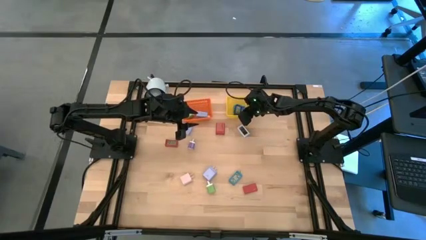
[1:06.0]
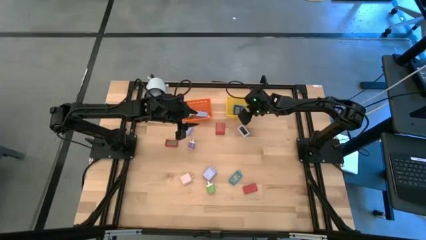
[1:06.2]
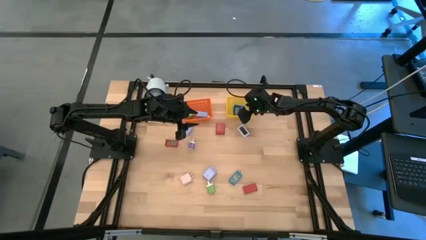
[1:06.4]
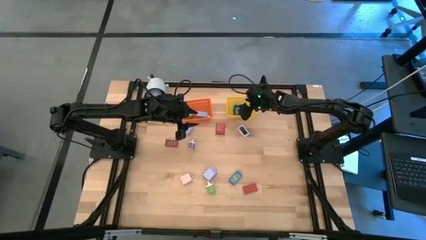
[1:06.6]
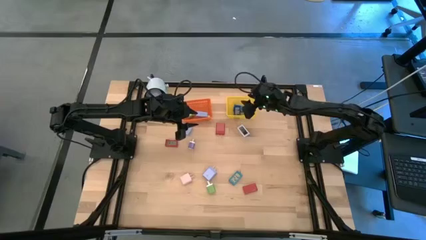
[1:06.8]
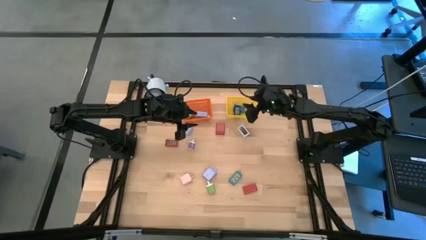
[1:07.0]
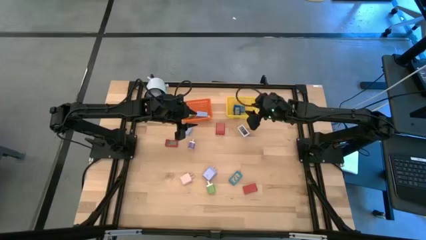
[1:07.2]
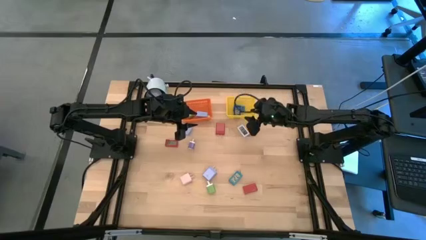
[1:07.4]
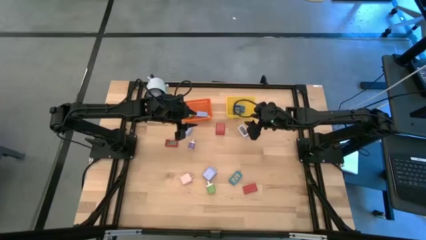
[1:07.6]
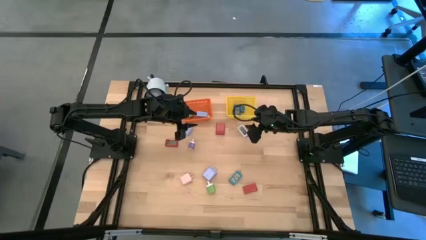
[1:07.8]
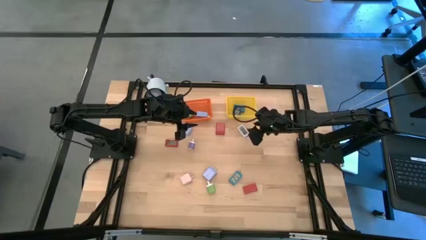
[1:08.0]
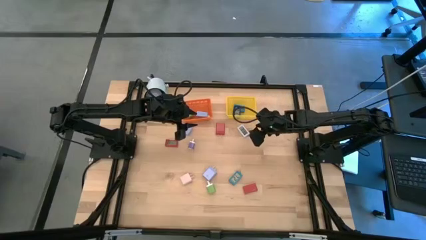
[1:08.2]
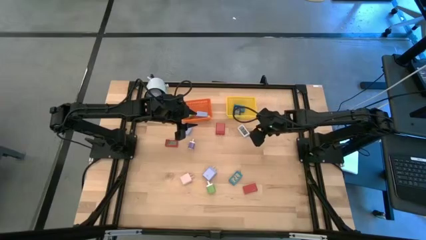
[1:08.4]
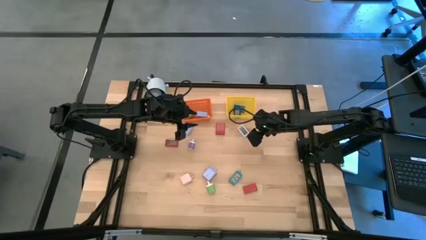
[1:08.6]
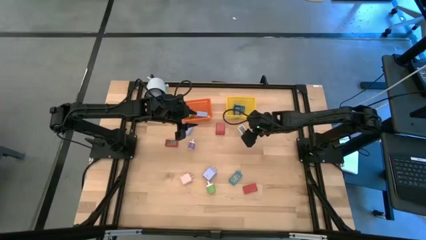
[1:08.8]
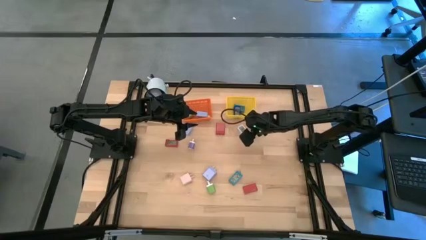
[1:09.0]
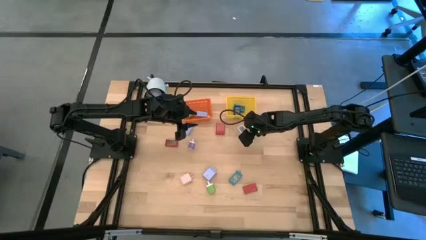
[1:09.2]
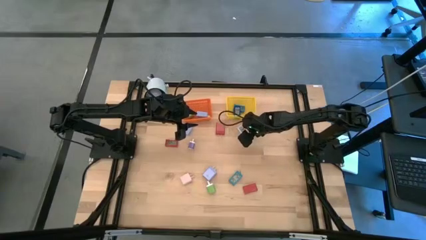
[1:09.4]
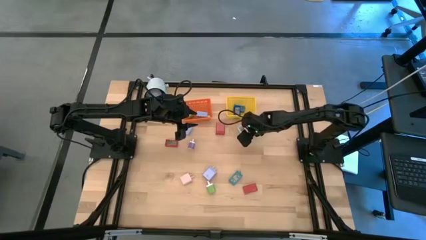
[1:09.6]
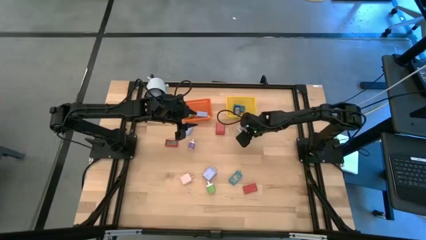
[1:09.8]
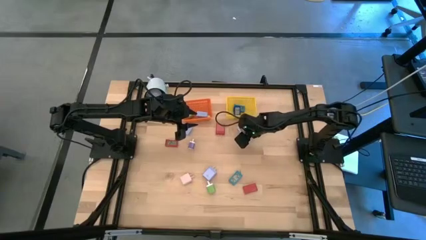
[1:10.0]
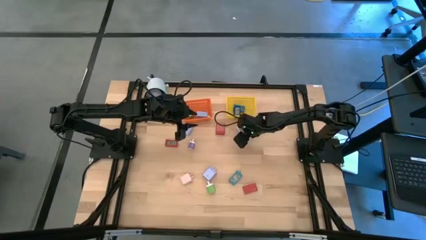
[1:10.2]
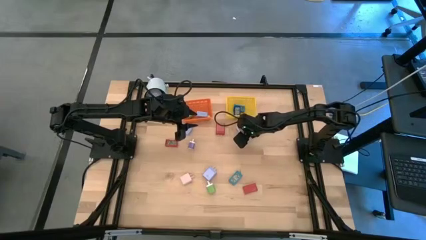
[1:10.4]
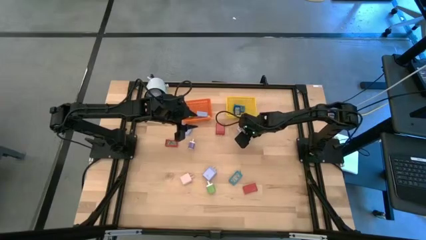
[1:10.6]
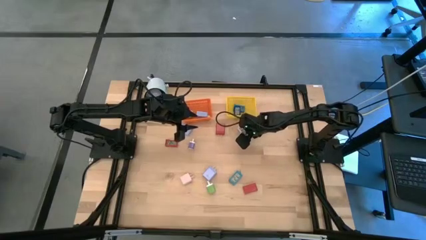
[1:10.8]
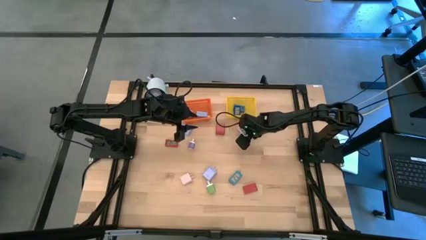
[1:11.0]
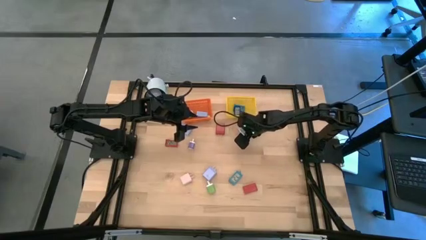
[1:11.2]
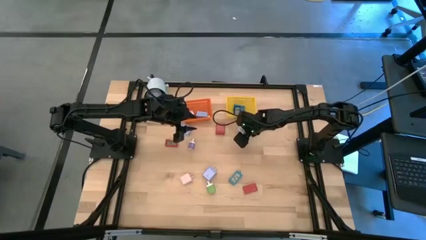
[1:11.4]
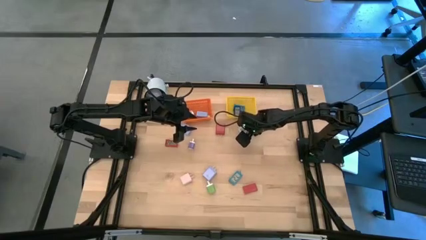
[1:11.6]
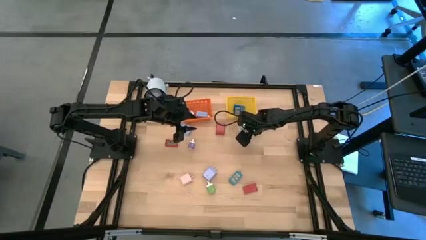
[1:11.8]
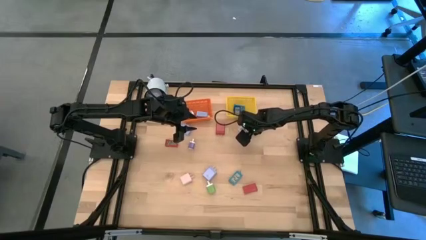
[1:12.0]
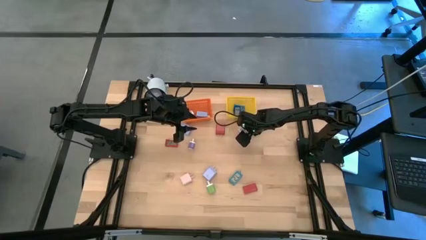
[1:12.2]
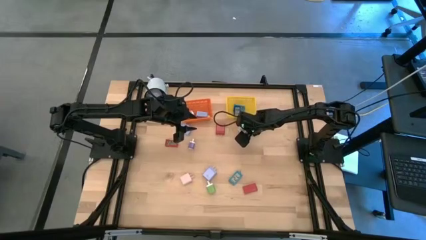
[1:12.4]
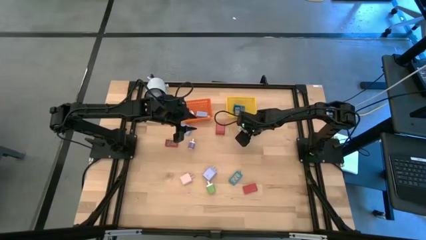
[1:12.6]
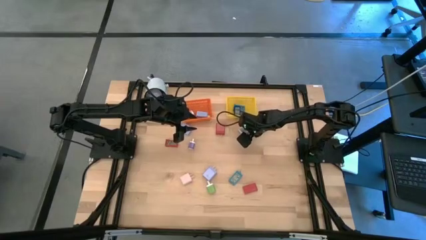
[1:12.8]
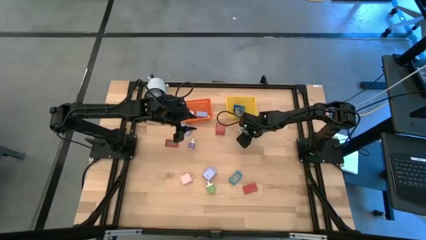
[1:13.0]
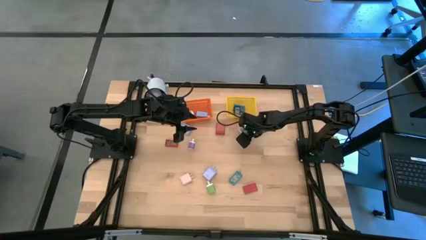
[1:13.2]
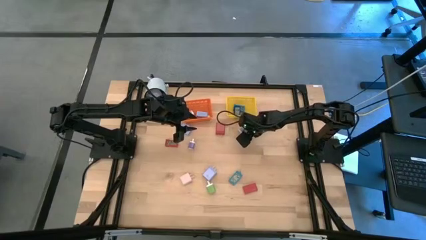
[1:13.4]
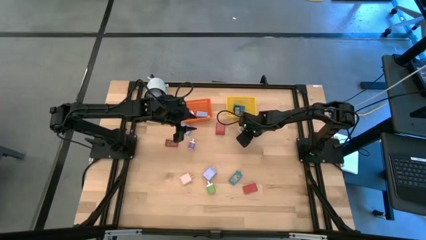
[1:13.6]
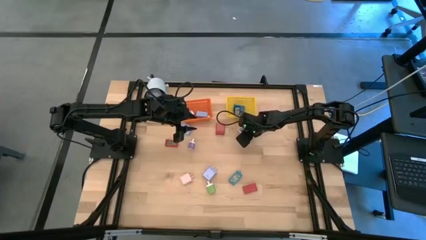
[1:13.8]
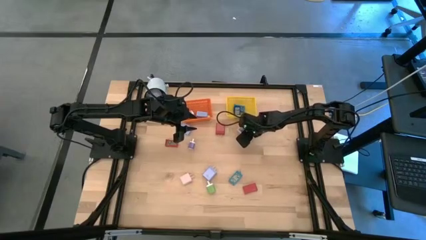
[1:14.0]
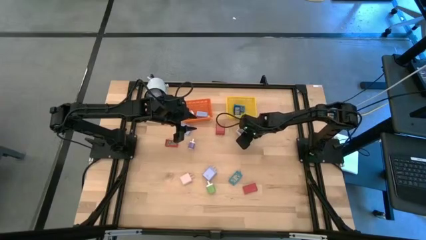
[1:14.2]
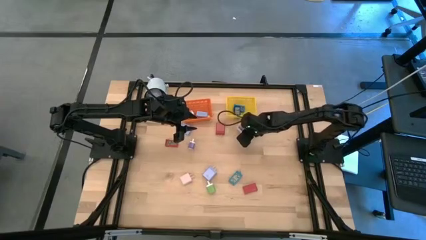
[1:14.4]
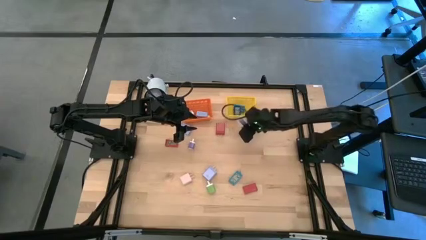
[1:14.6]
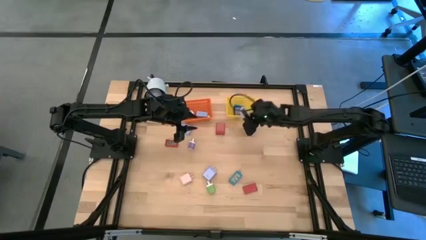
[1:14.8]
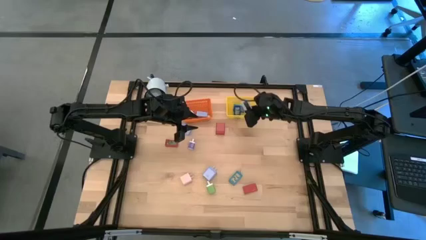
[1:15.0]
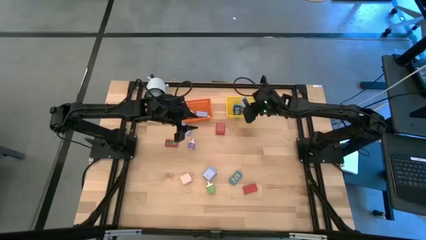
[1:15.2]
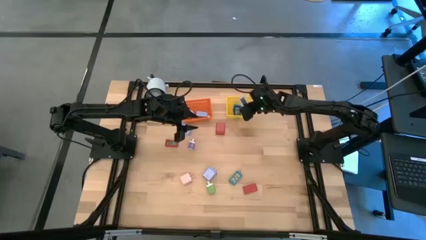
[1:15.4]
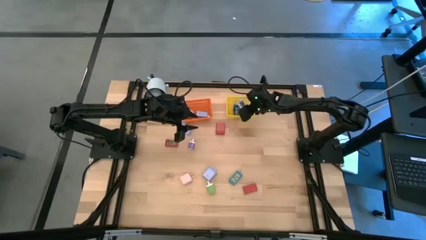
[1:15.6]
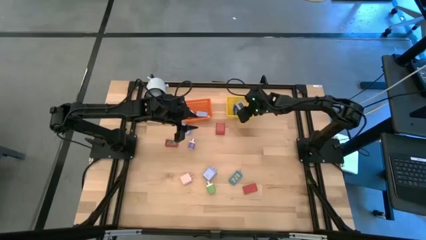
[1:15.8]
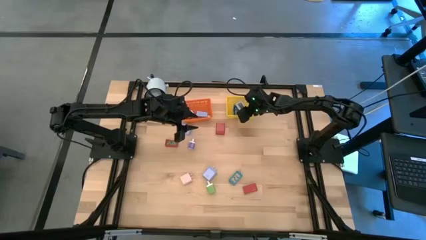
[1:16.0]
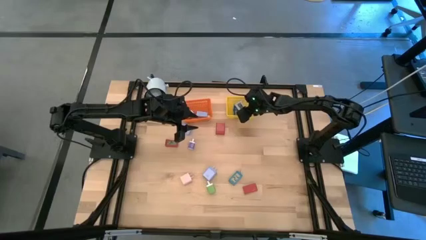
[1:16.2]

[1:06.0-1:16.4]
Task: Pick & Place Office items
Put the white digital clock into the yellow bin

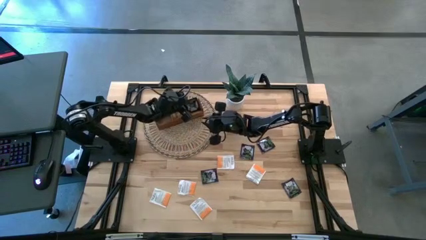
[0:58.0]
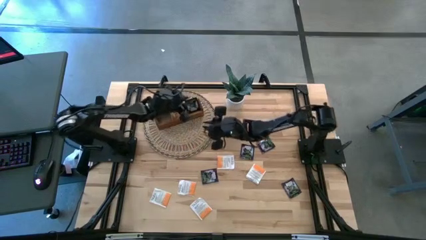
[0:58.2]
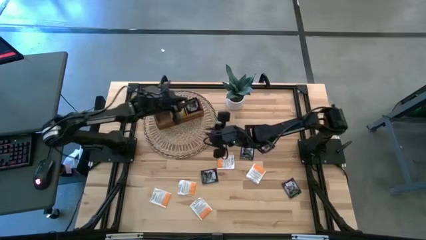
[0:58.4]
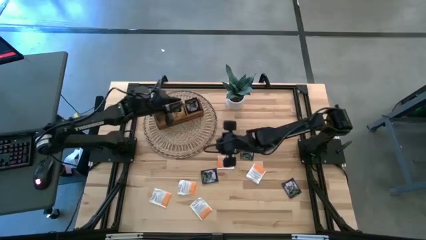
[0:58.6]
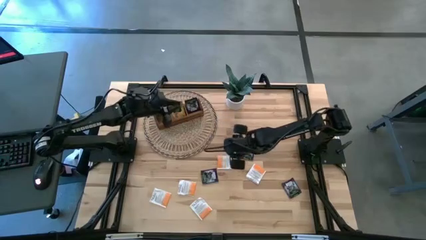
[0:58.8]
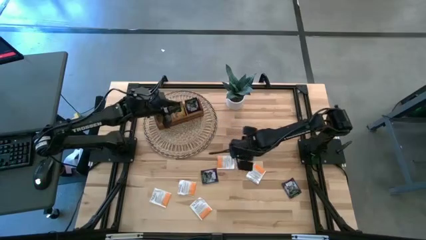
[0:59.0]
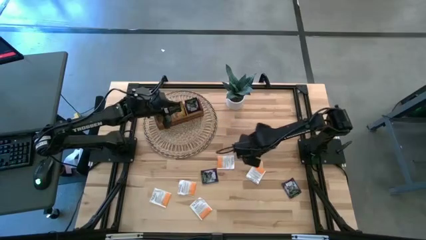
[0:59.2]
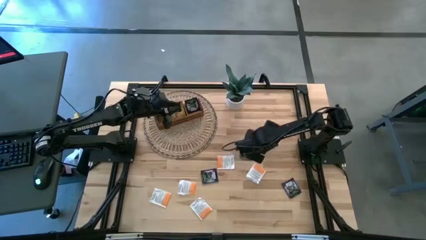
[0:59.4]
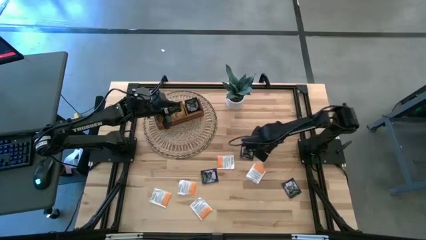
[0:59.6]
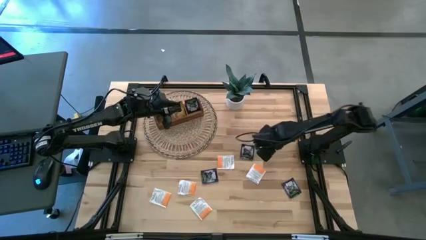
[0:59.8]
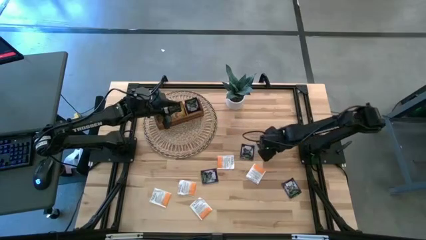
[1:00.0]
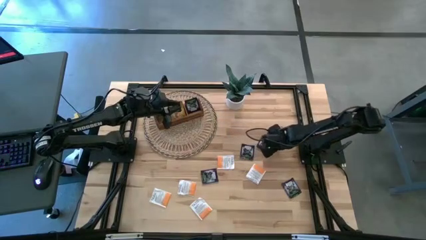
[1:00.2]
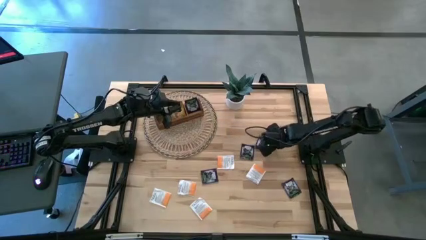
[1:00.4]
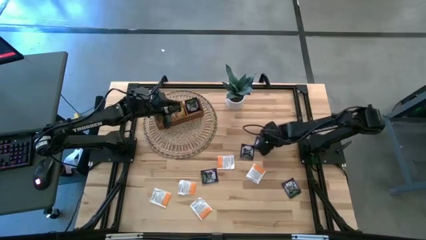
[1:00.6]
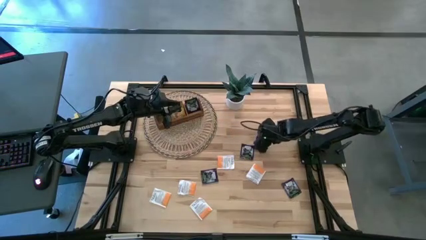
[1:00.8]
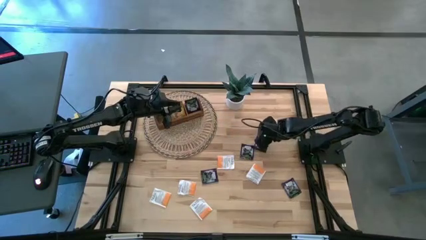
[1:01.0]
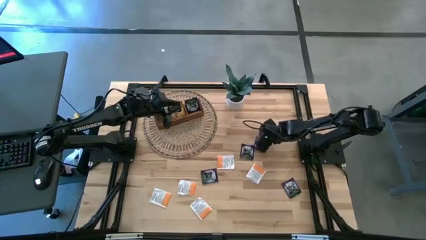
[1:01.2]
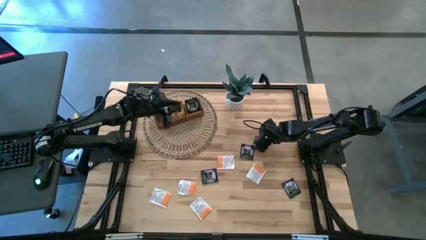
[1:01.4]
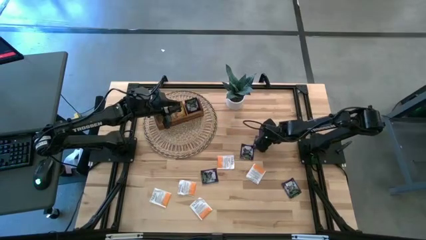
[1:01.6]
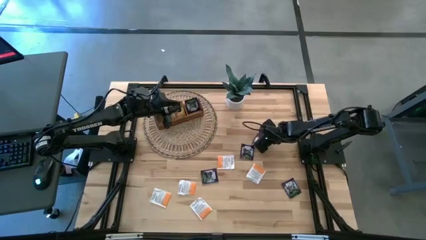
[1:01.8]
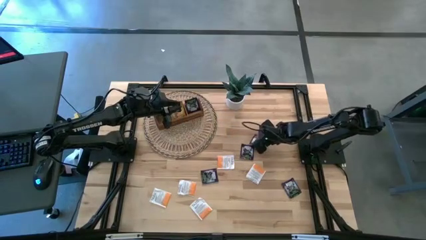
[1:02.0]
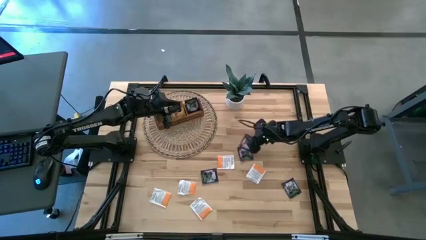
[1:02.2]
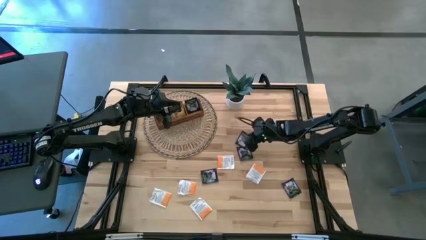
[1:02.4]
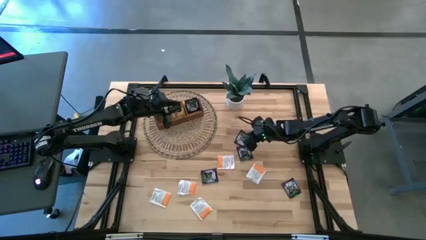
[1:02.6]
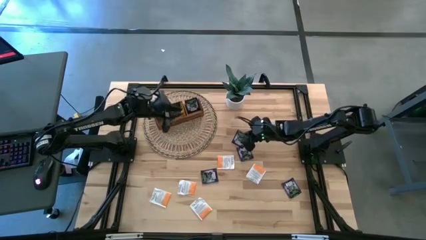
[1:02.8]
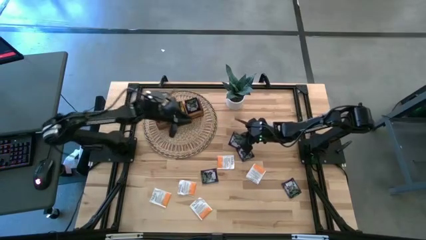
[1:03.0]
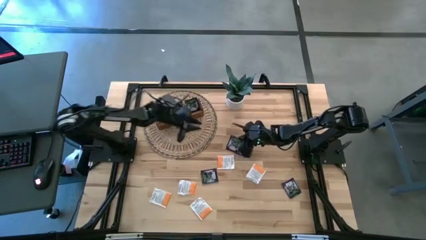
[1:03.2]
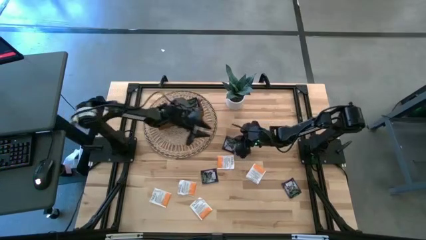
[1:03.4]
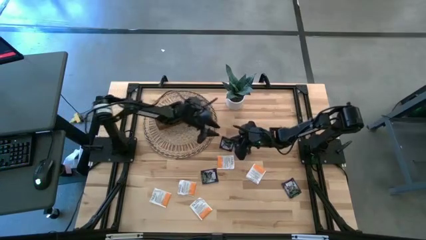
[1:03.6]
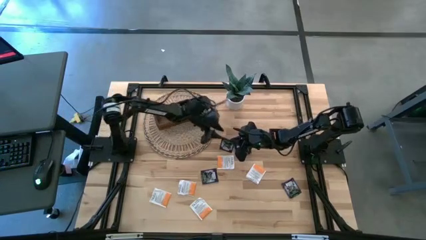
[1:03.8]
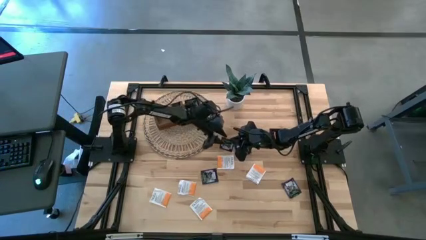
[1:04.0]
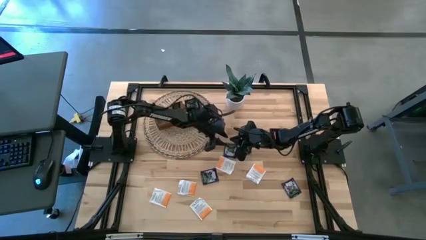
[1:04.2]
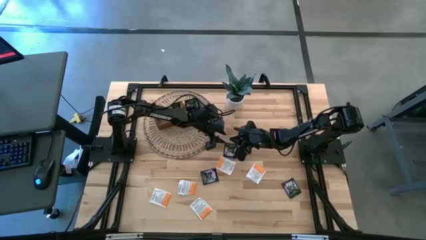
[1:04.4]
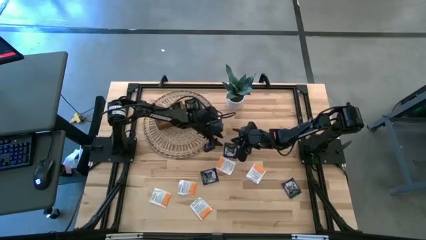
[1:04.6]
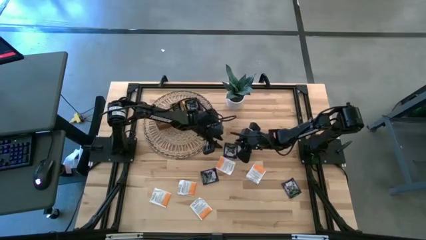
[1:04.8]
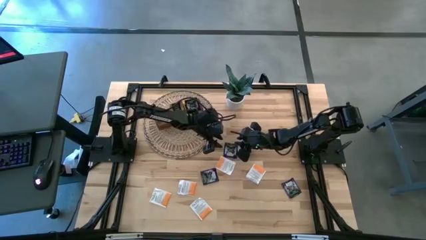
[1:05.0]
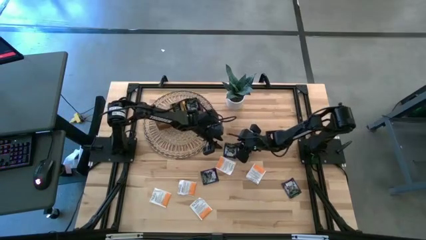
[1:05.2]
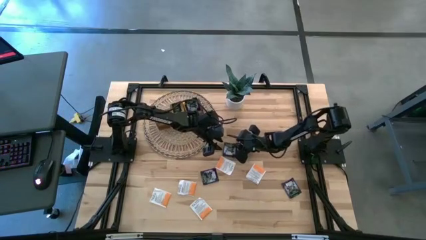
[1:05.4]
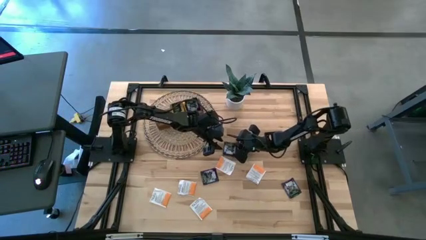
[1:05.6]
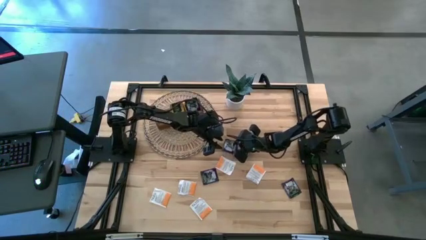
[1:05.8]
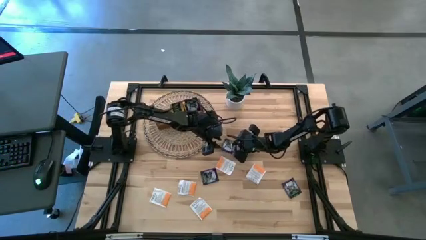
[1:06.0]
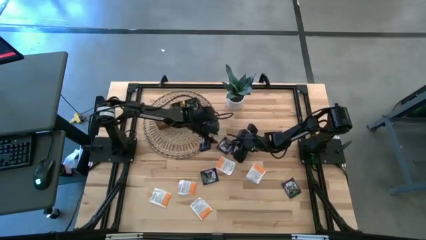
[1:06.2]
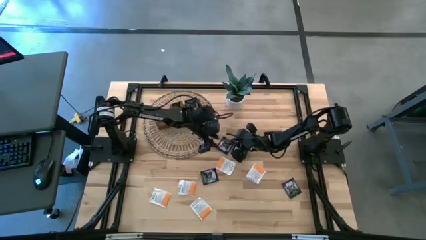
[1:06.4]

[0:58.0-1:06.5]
Task: Pick & Place Tea
Put the black tea bag into the right section of the wooden organizer
